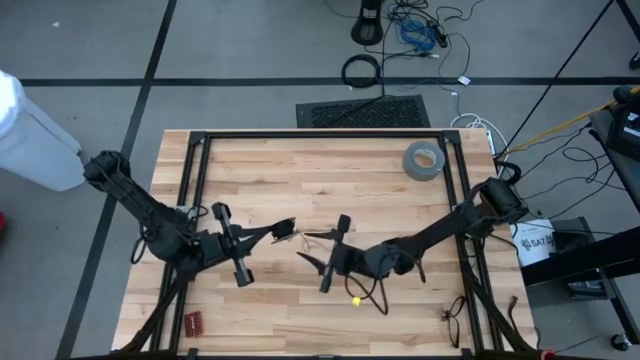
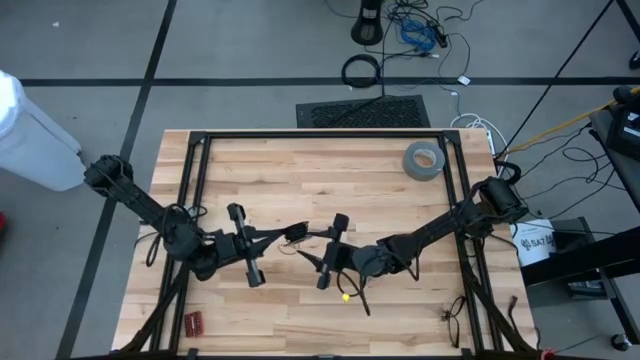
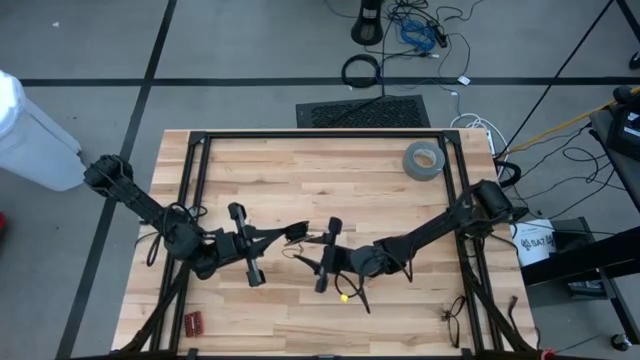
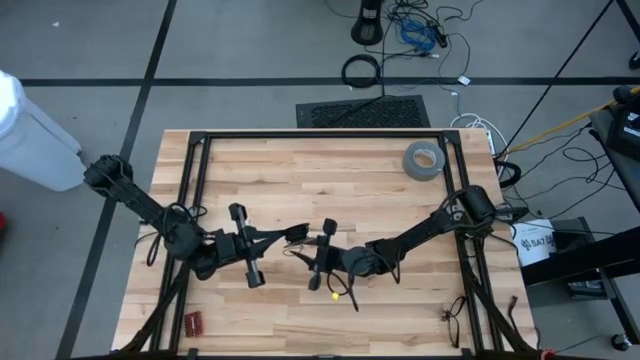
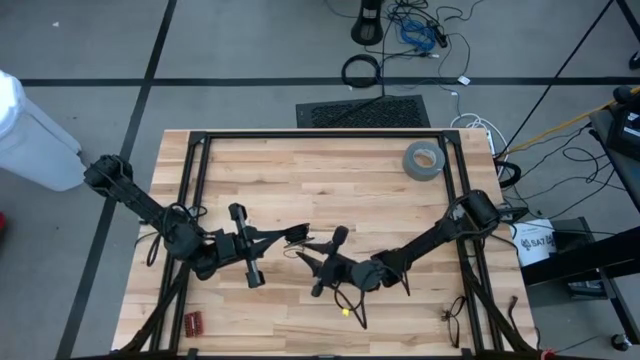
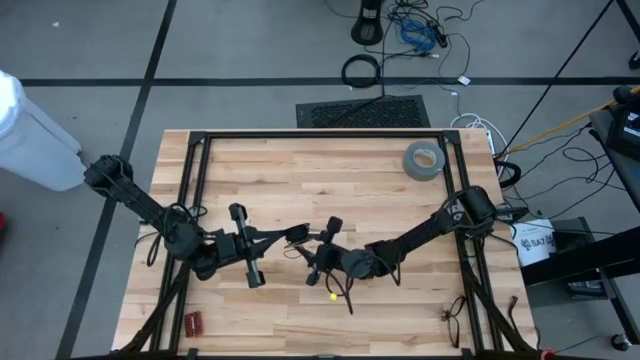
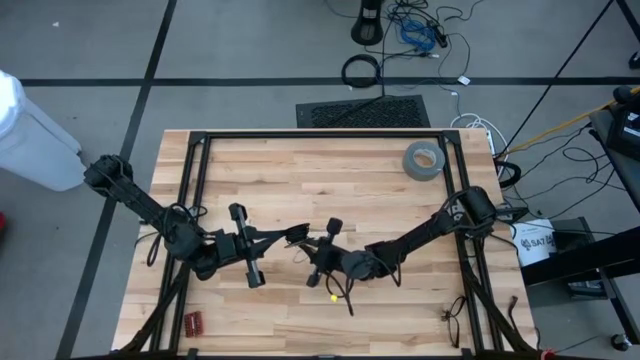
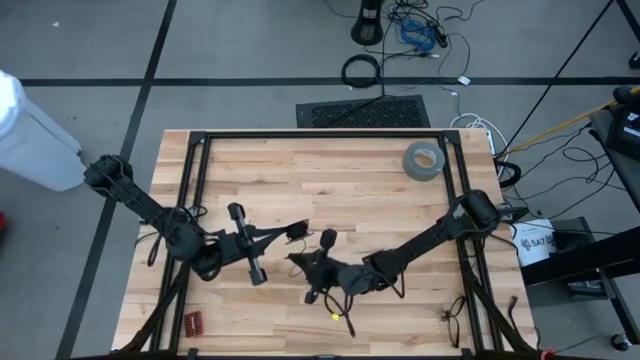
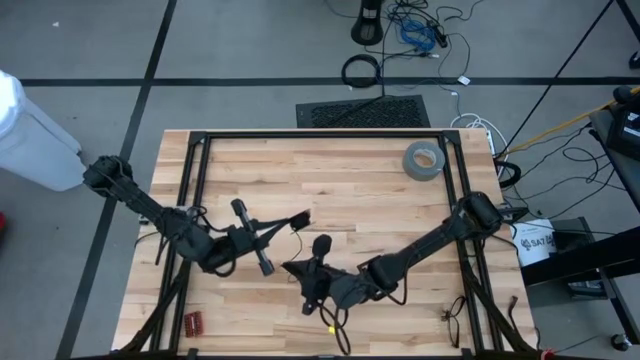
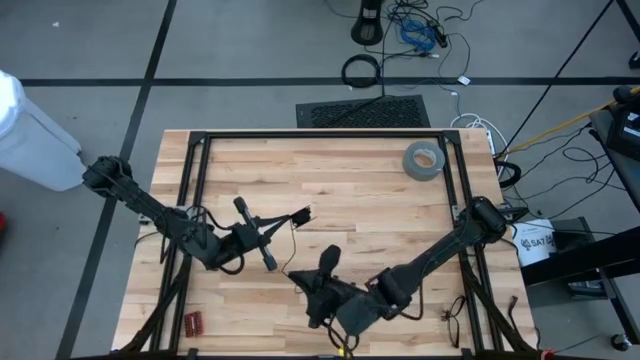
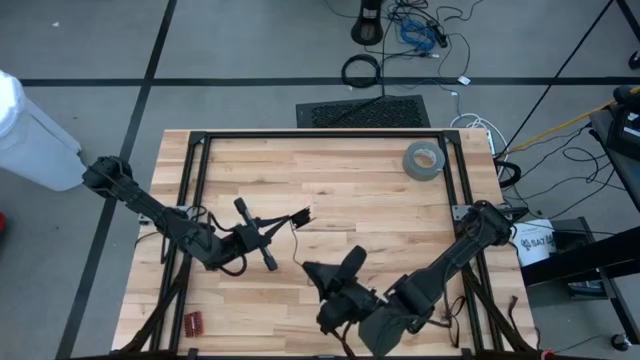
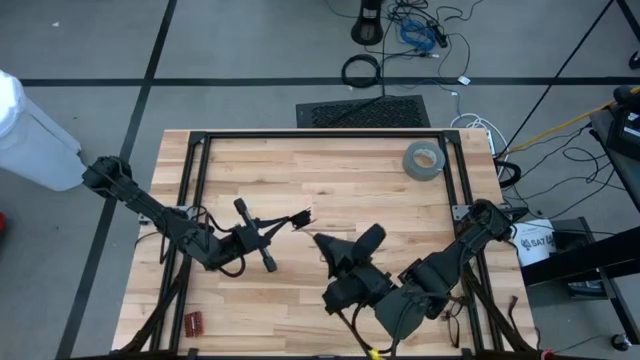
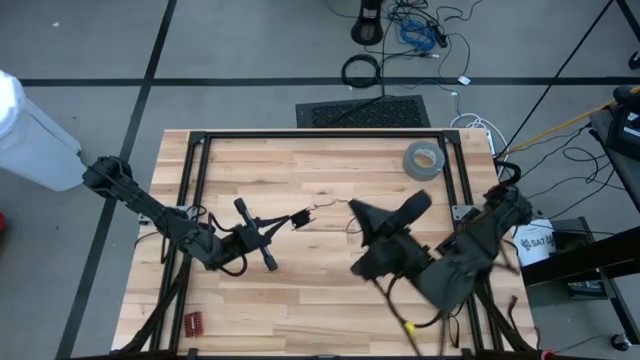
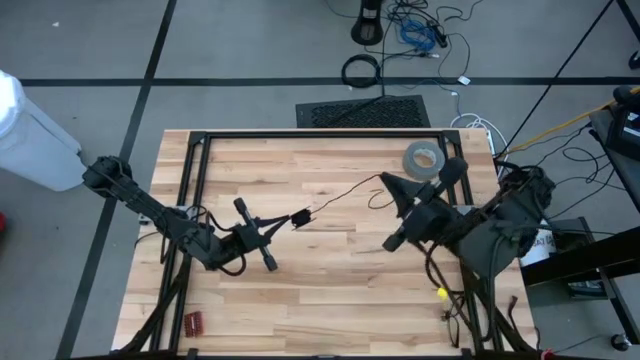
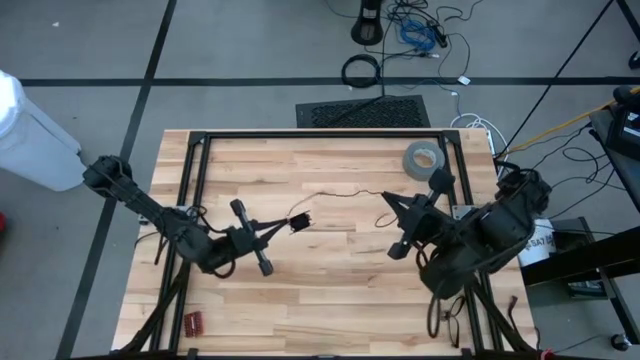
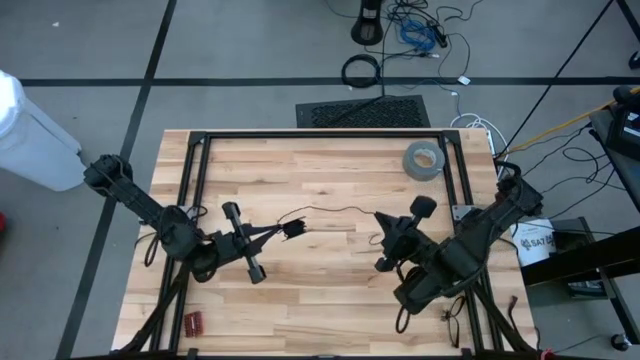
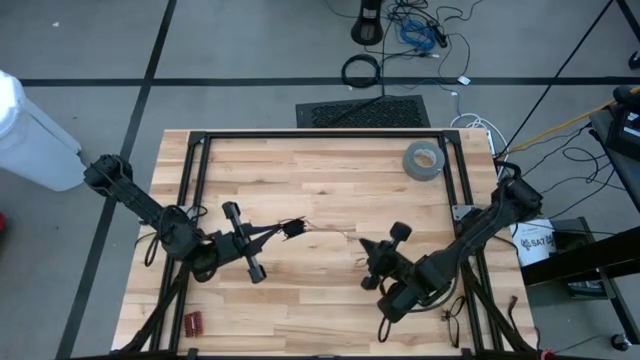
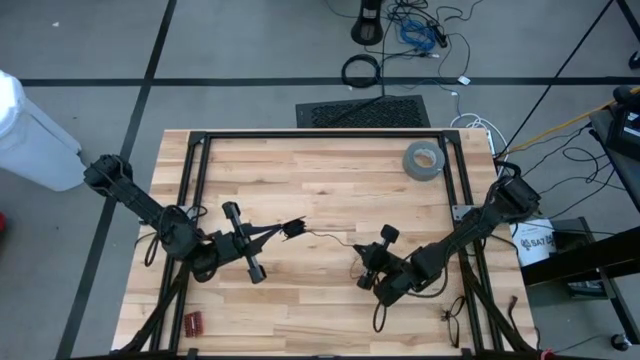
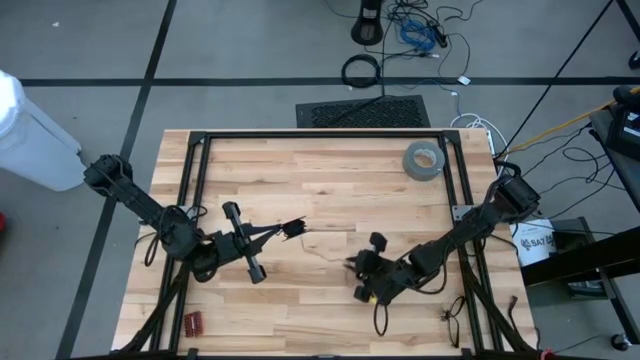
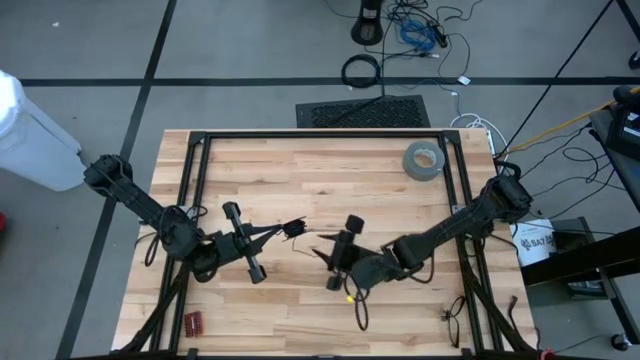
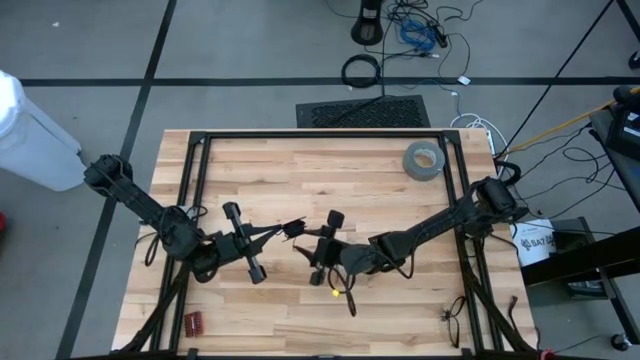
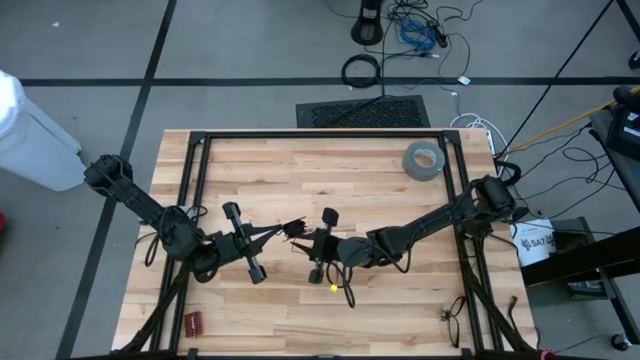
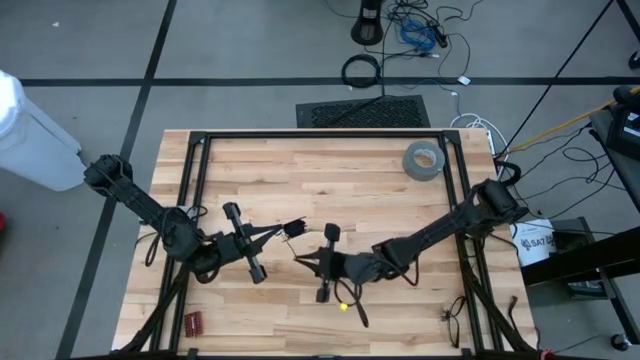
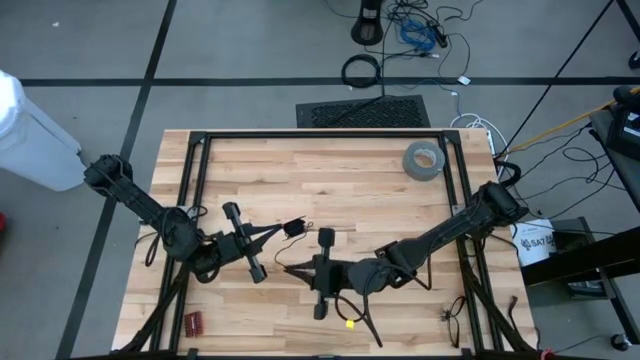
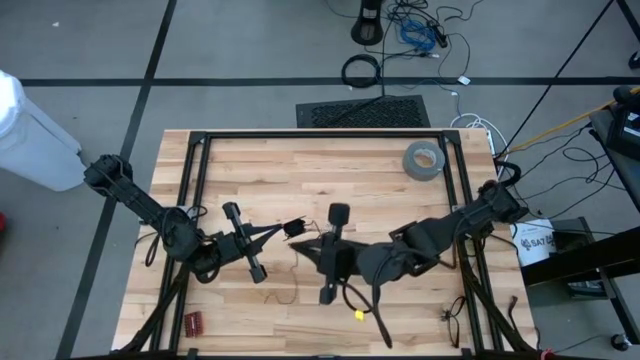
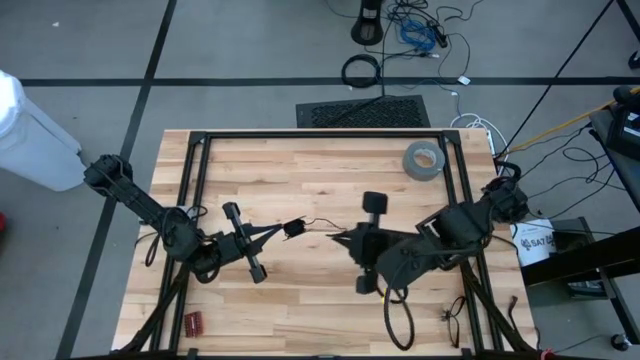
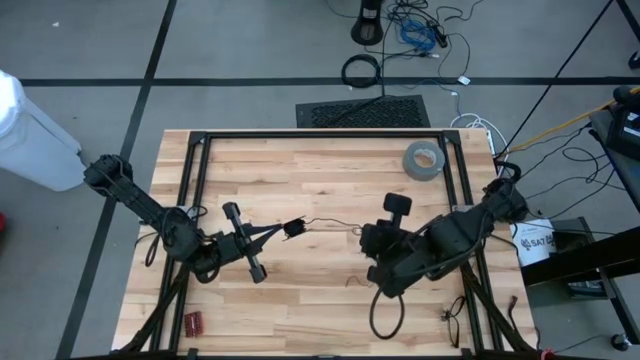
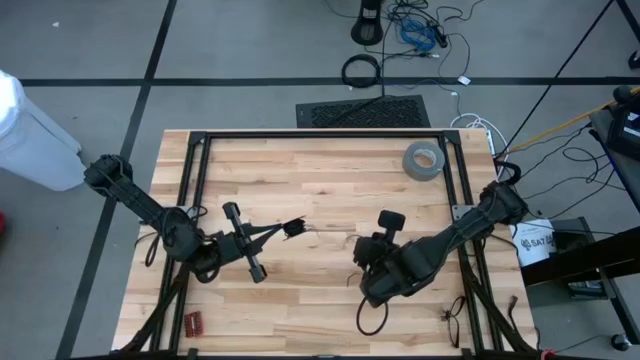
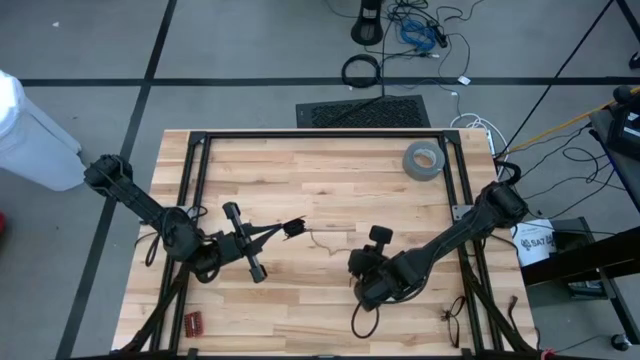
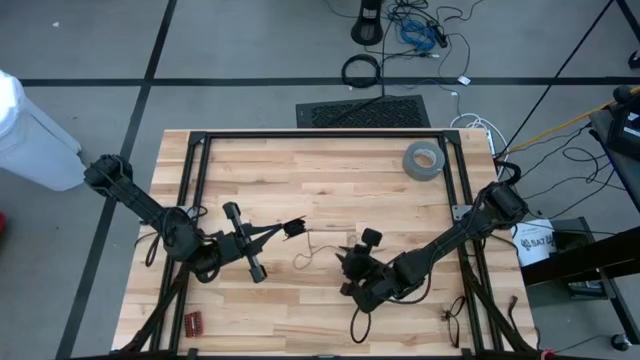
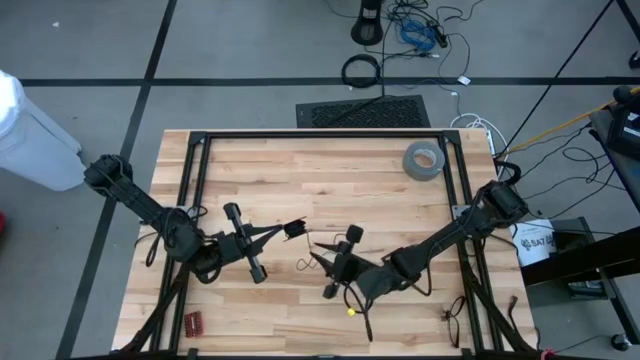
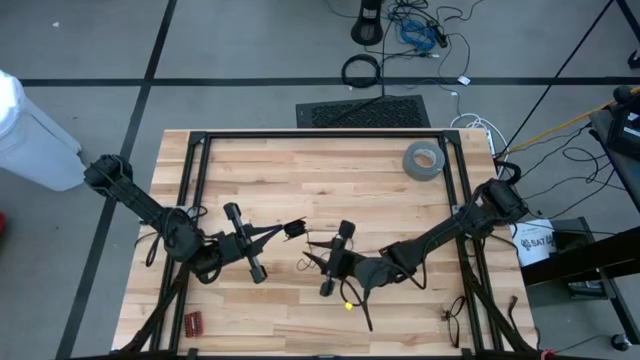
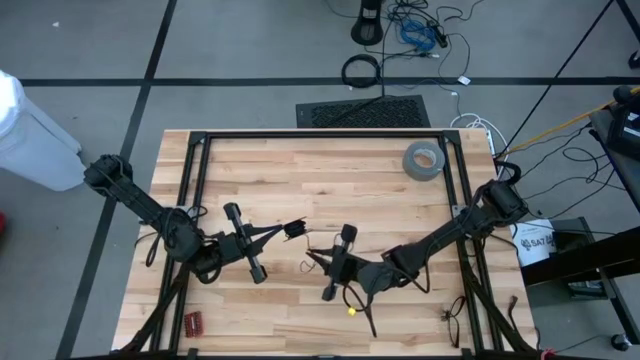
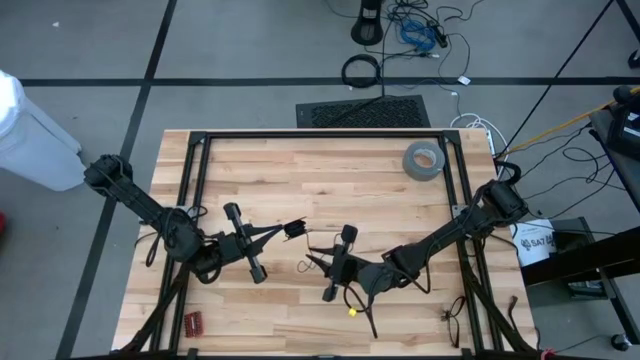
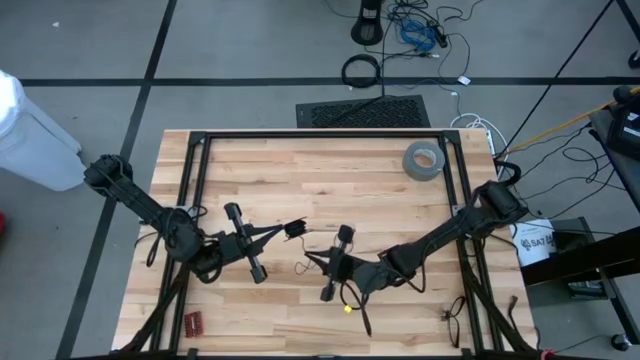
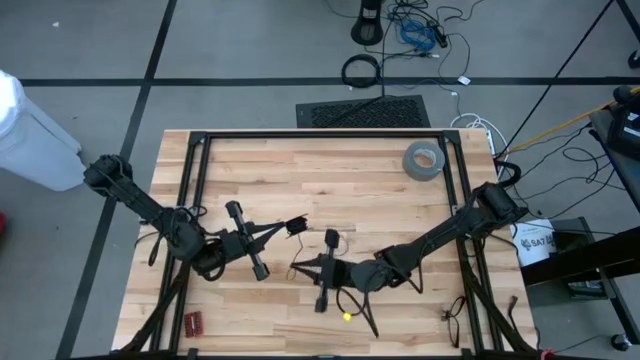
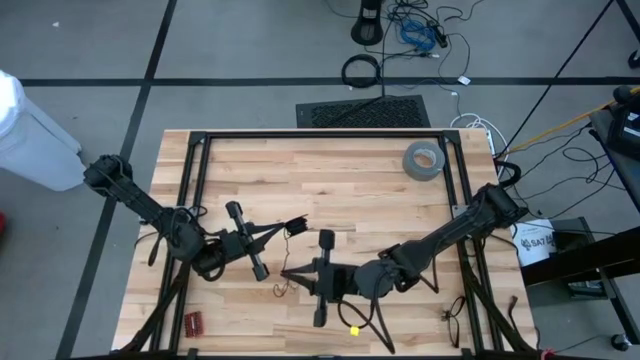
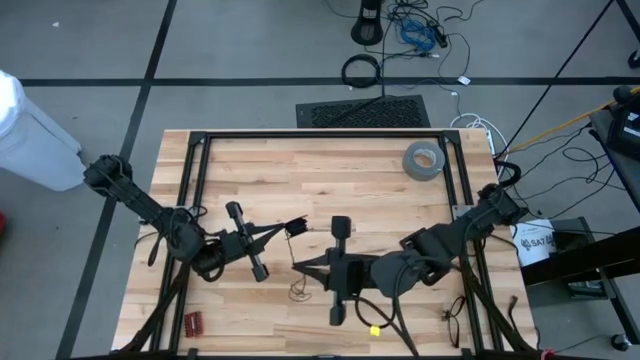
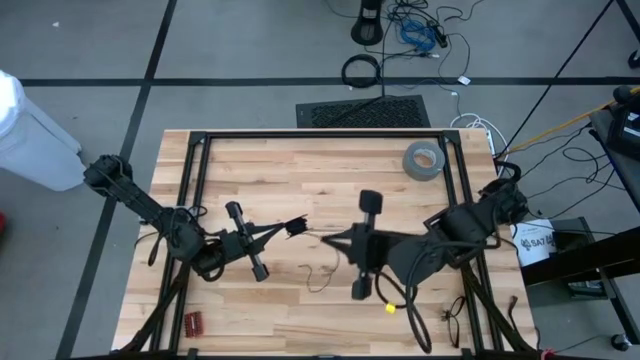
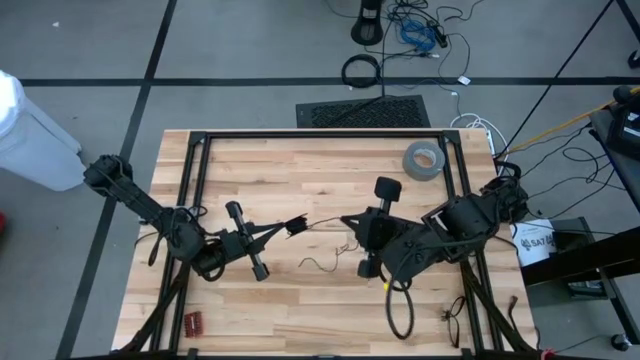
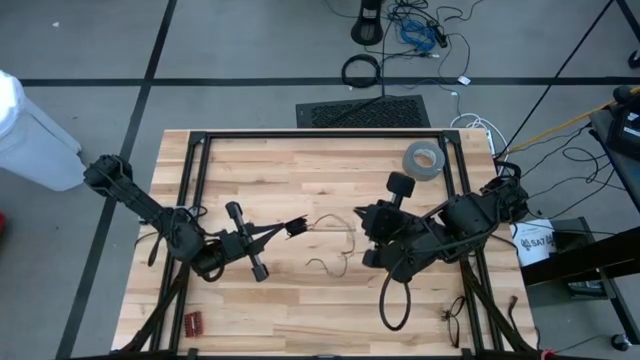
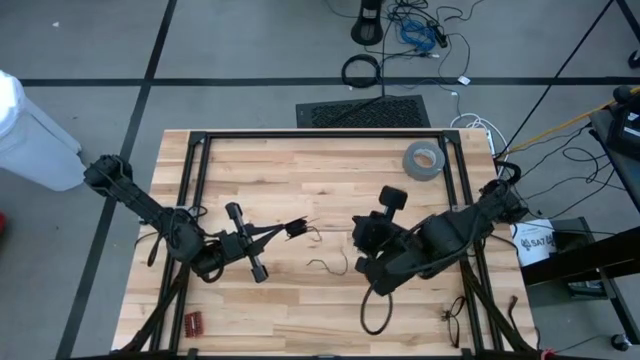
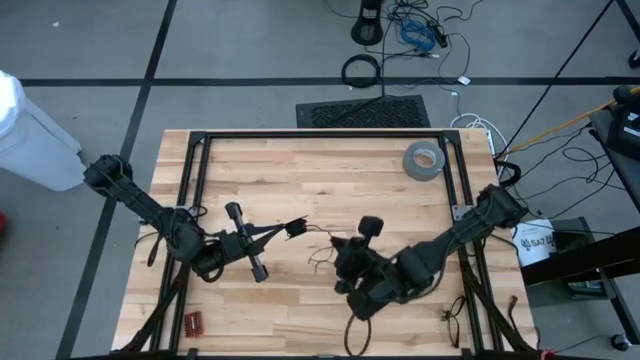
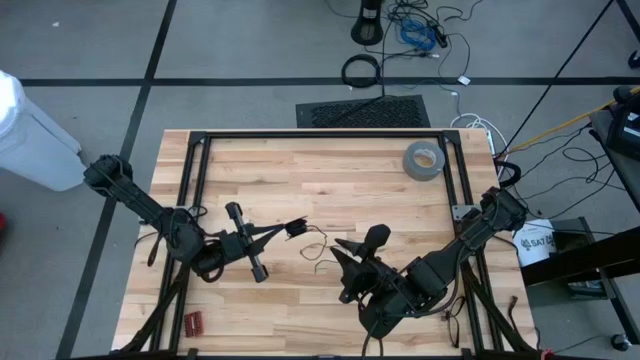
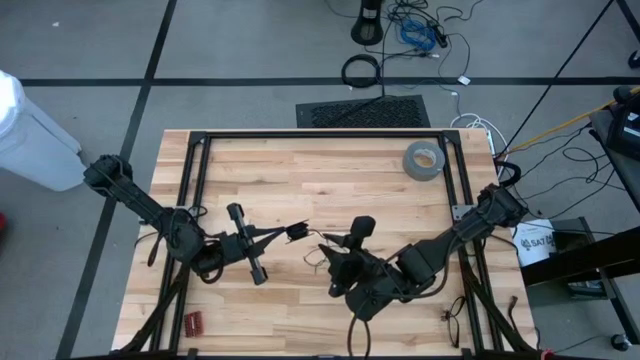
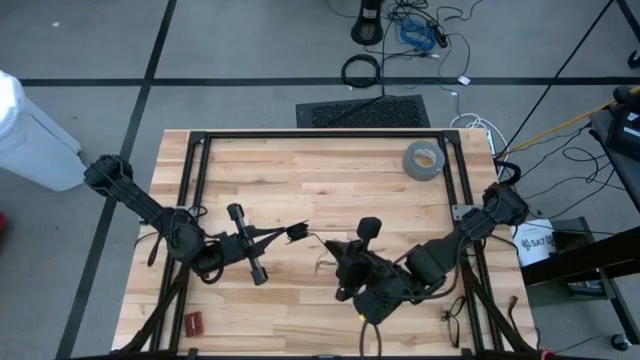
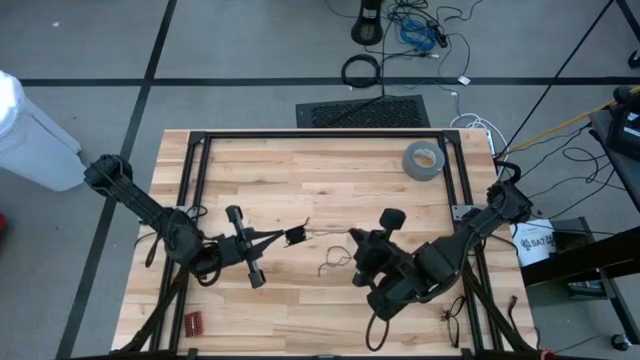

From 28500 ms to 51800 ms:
Task: Coil cords
Uncoil the black wire from the spool
